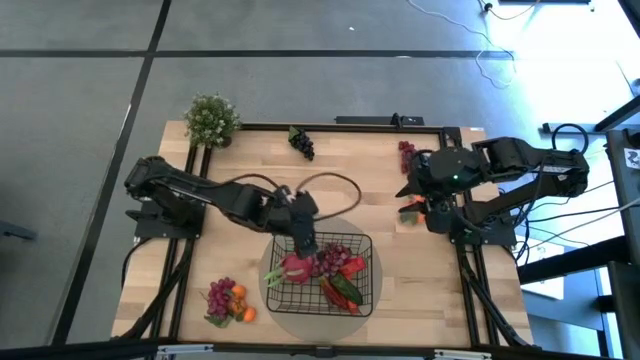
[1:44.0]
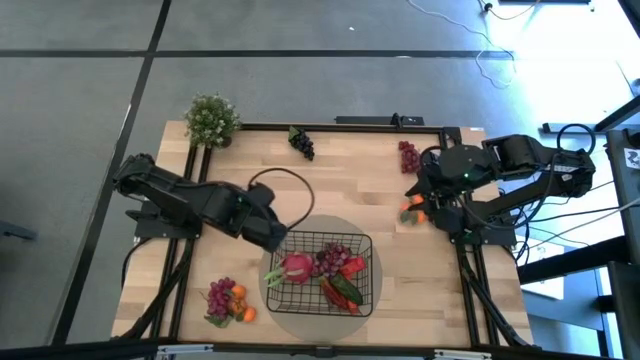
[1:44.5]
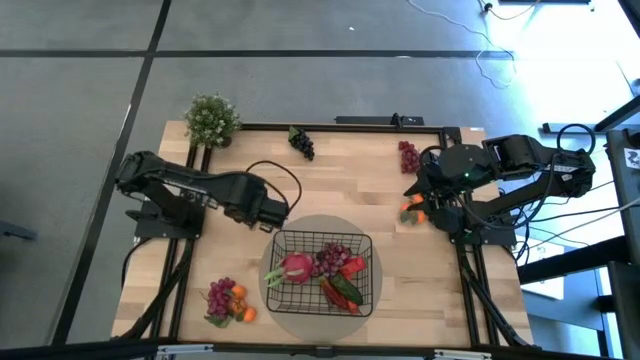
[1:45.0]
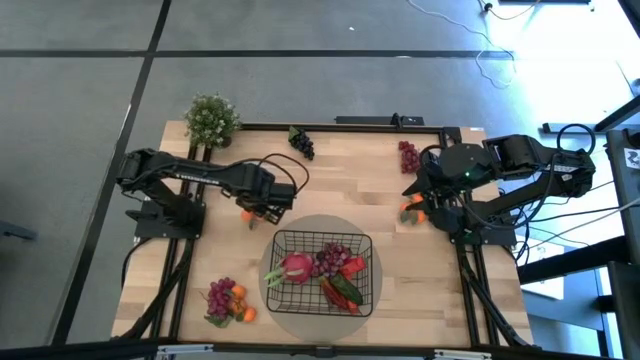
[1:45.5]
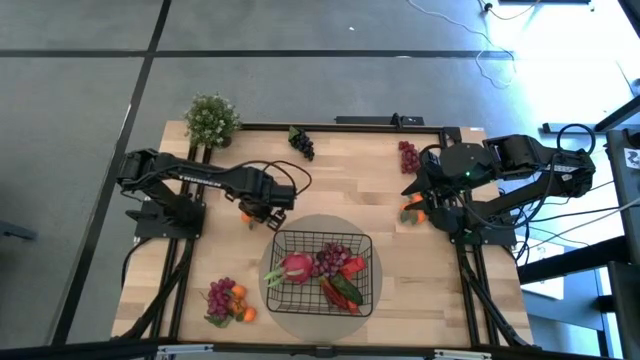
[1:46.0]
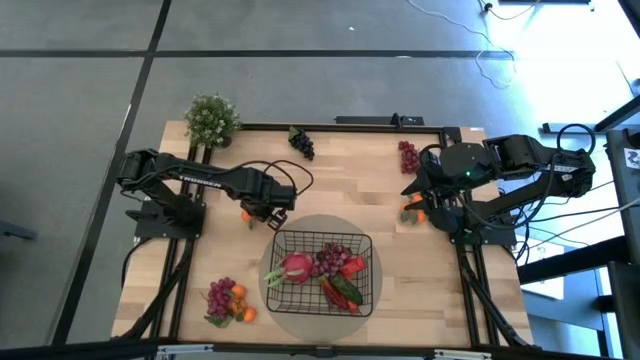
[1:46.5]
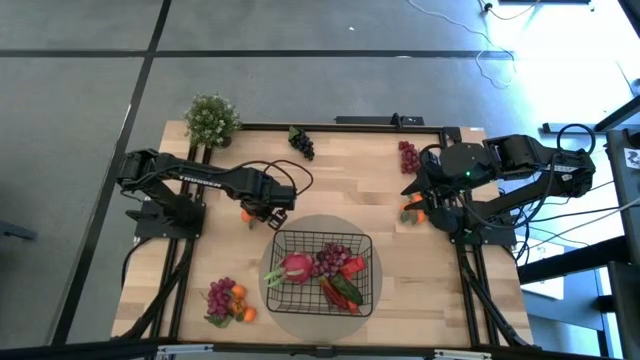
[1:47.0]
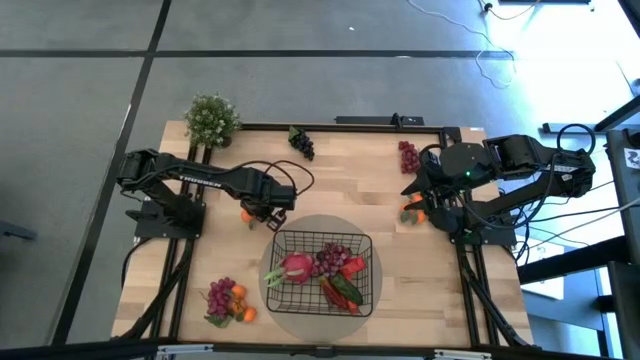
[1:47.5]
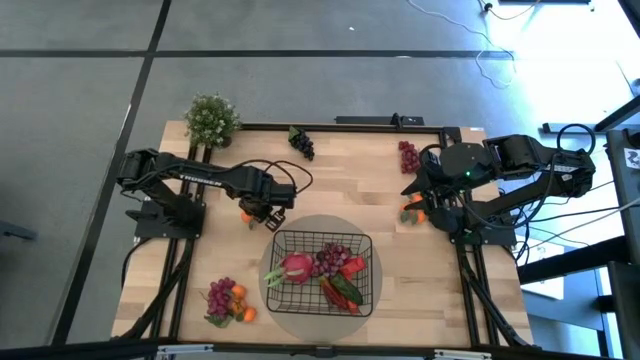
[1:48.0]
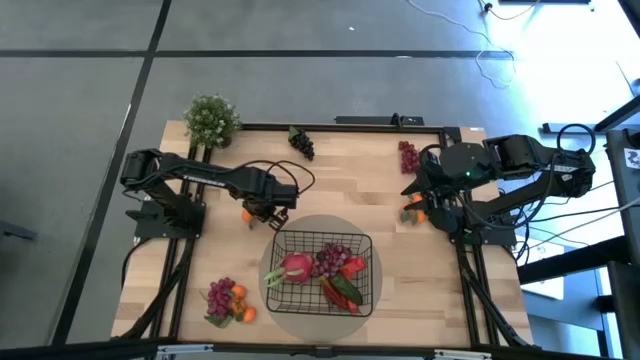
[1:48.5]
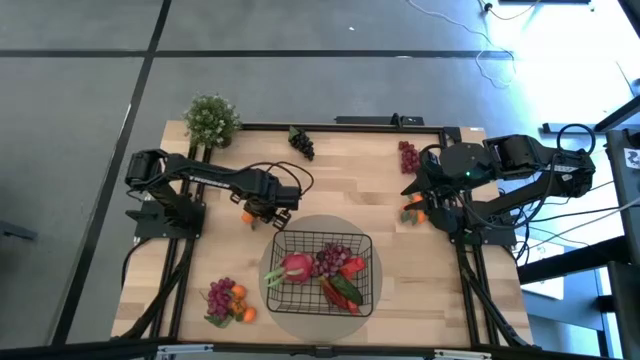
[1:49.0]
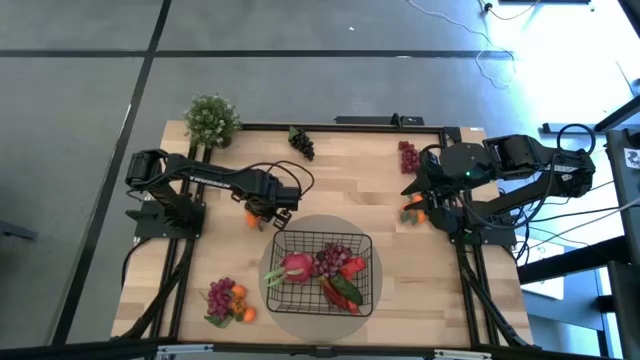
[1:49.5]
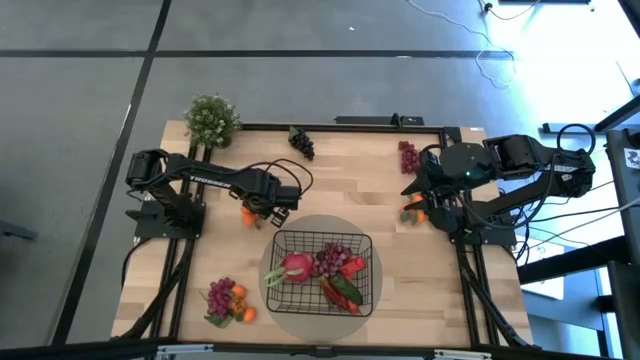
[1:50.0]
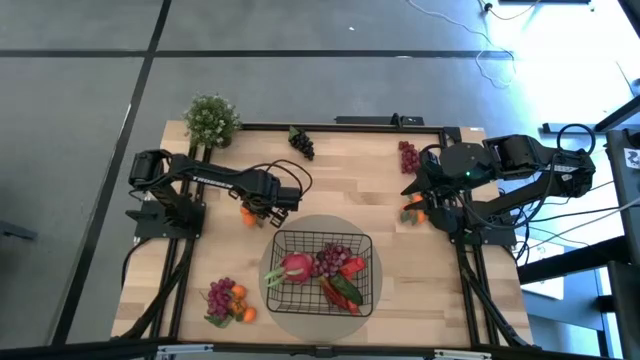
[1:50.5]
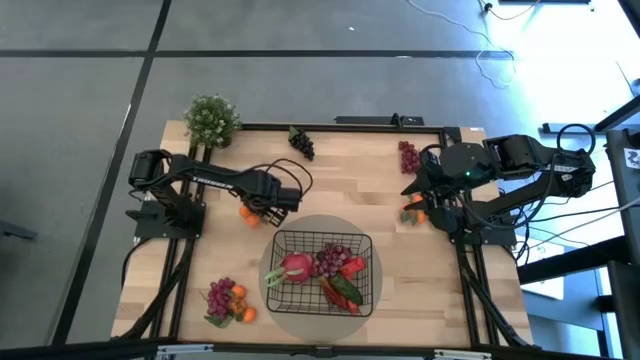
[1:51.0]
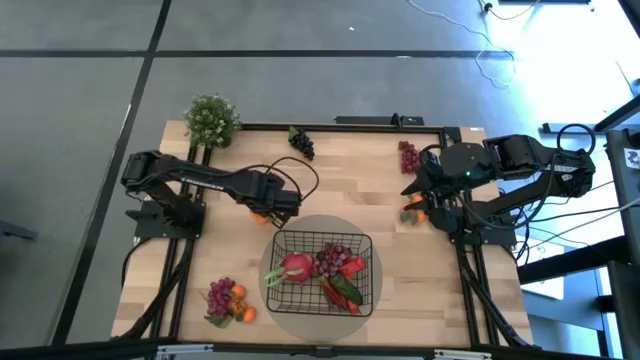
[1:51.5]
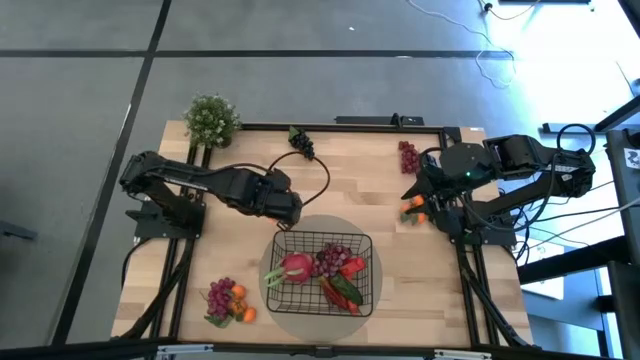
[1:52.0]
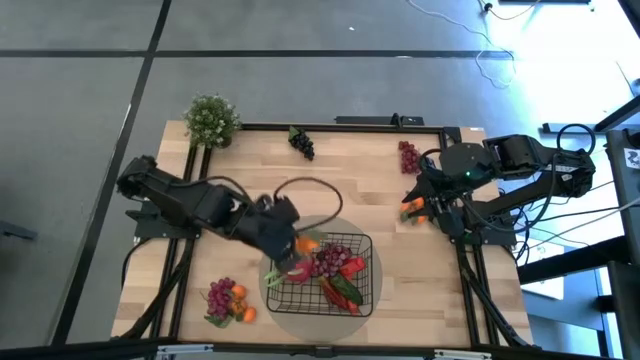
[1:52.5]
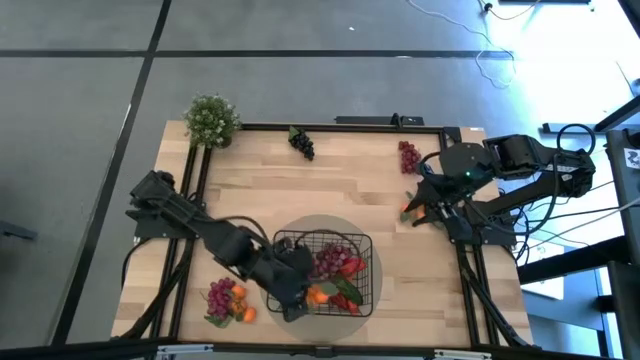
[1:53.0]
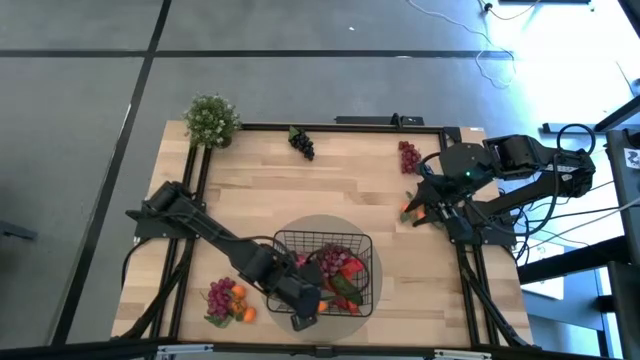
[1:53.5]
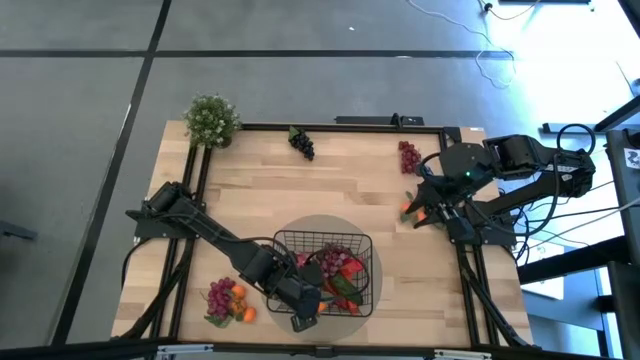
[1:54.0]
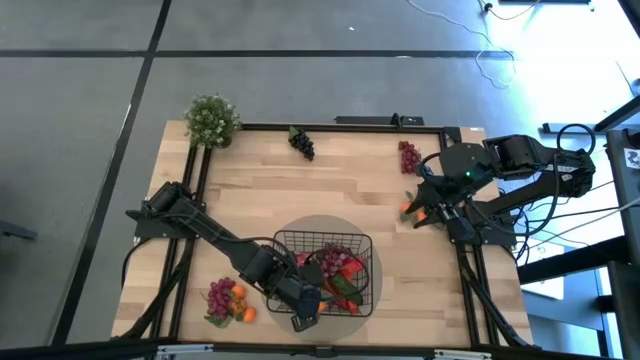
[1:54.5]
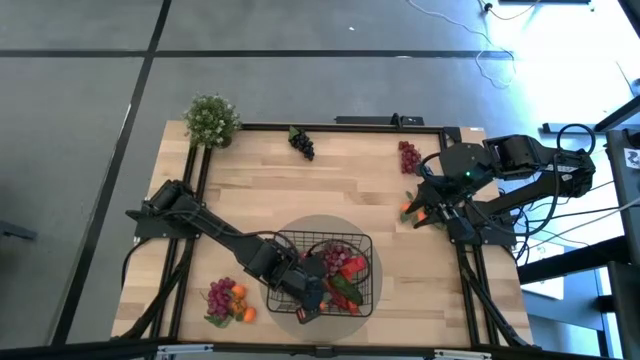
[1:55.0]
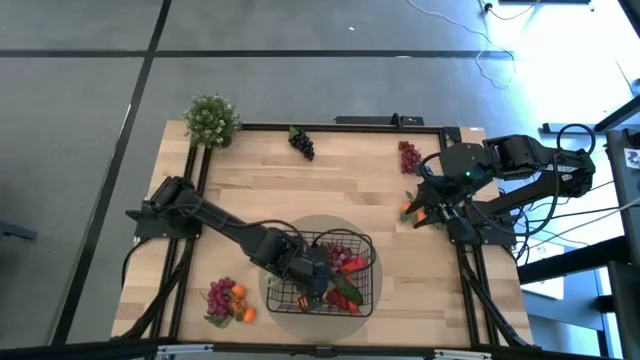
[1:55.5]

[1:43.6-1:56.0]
Task: Build produce basket
Put the top left oranges into the black wire basket

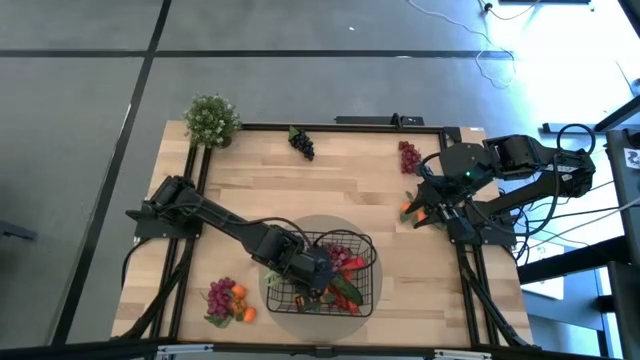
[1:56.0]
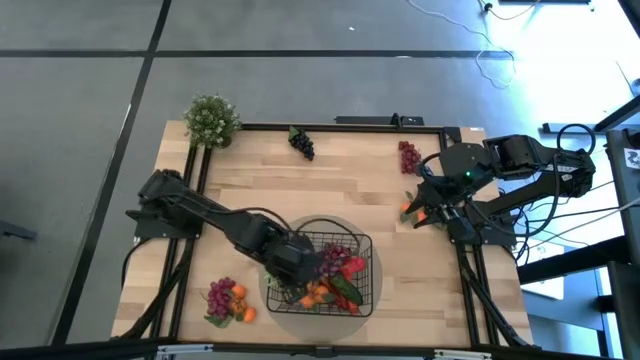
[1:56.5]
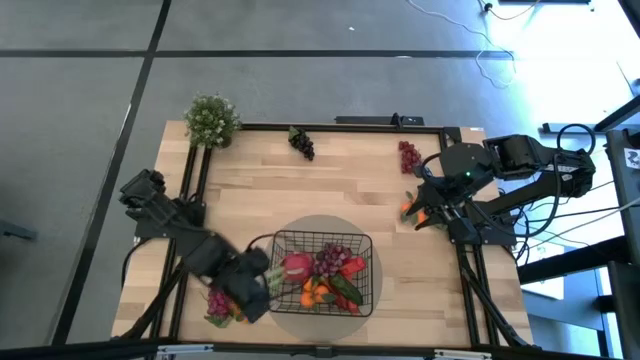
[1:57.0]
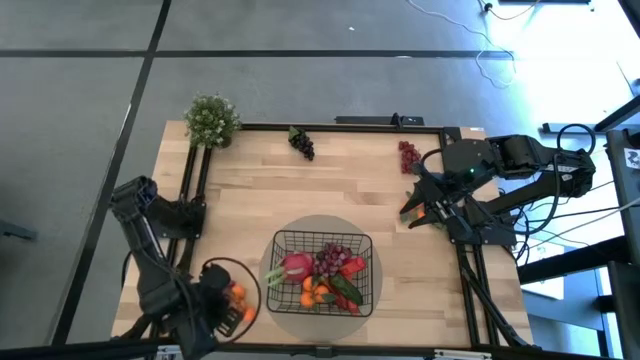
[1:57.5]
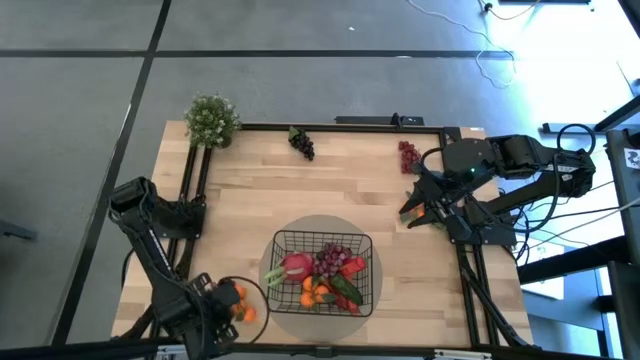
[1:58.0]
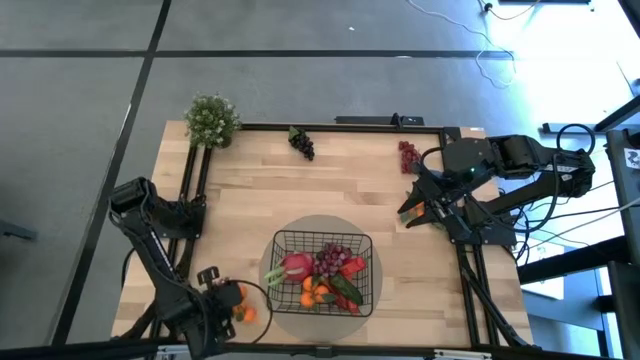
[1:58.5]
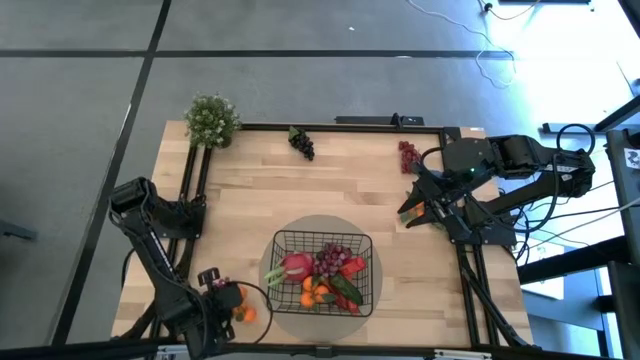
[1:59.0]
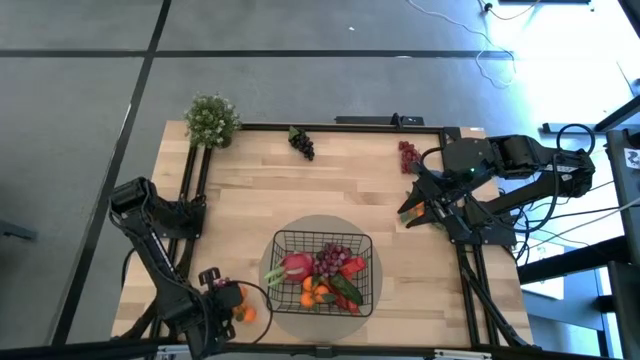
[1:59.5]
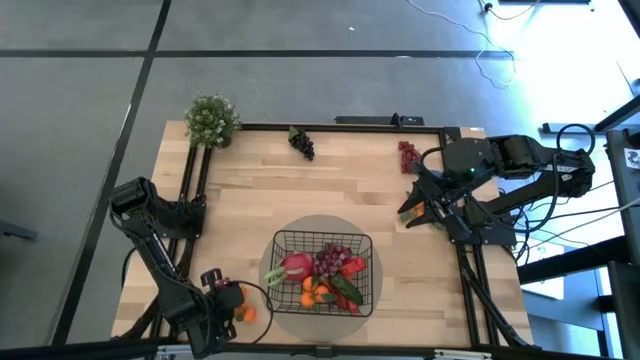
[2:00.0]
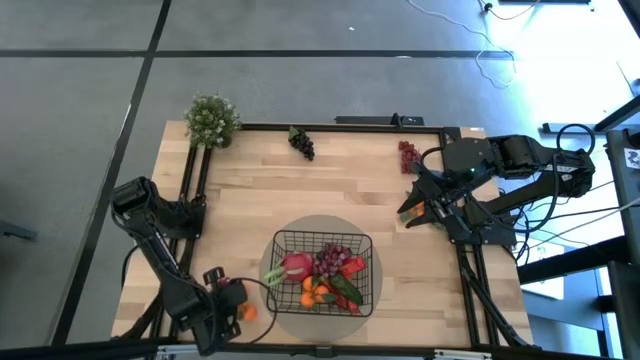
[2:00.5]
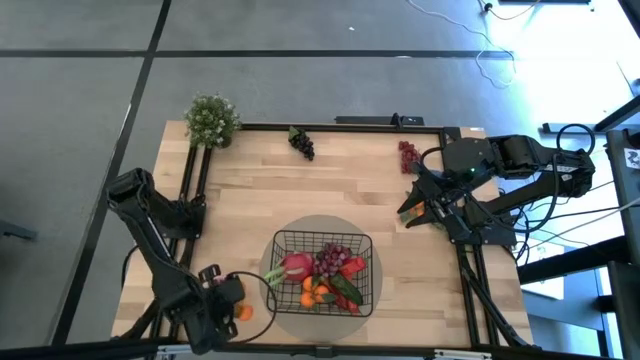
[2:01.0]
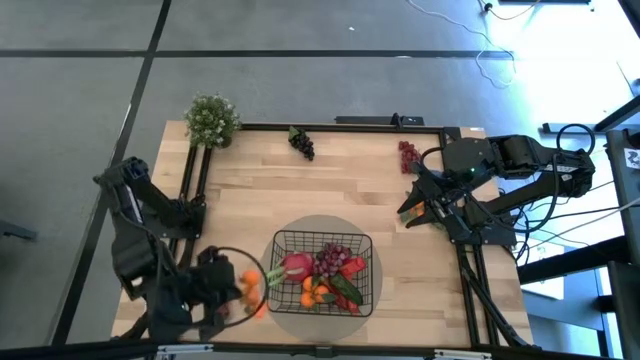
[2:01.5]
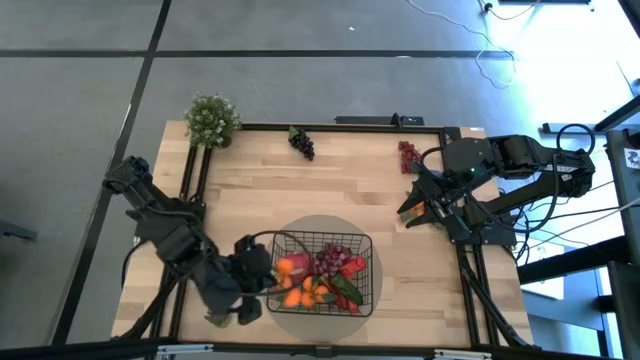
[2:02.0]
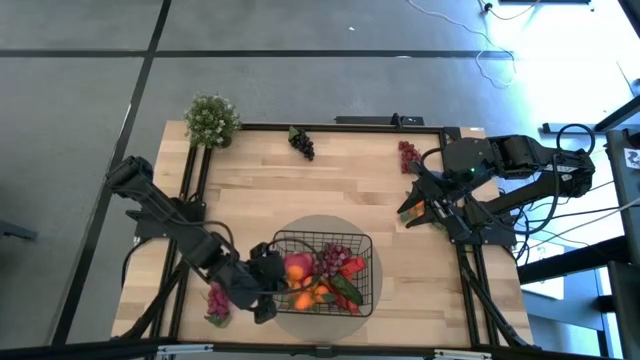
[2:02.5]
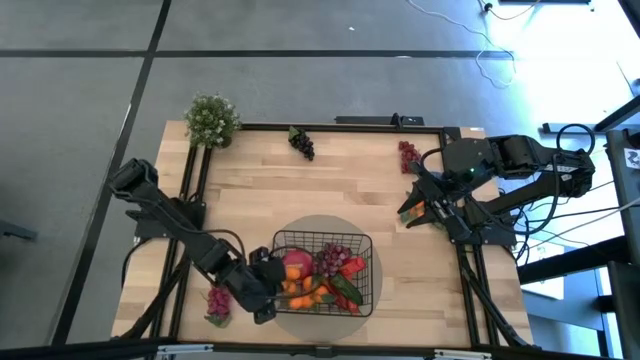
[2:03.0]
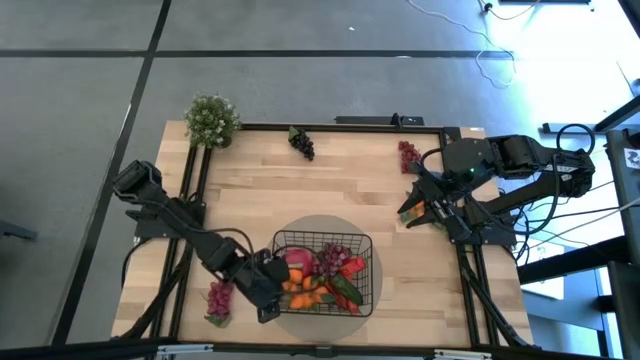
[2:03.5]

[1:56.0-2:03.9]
Put the bottom oranges into the black wire basket
